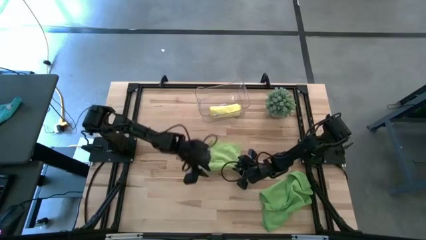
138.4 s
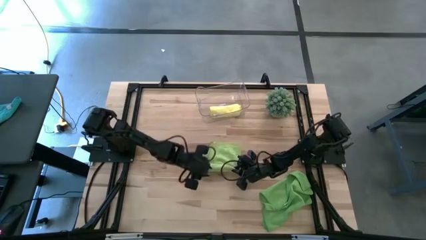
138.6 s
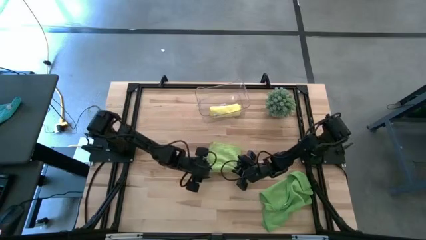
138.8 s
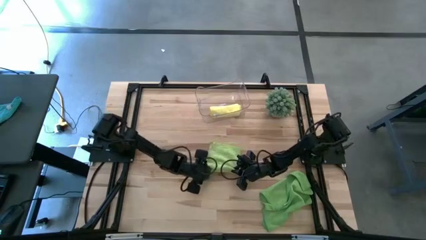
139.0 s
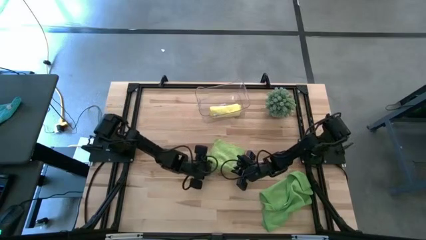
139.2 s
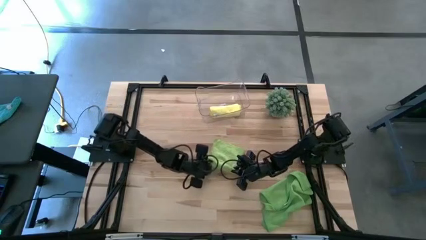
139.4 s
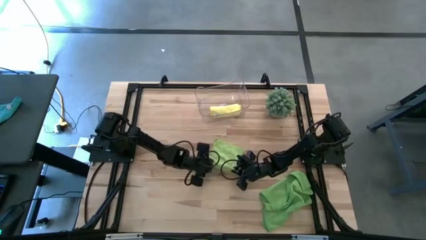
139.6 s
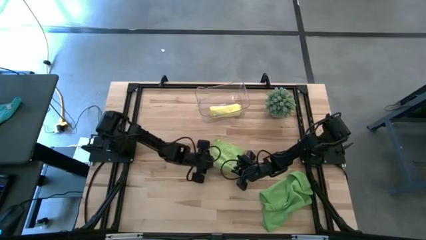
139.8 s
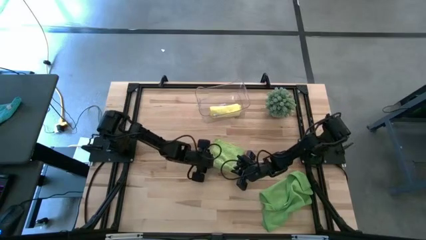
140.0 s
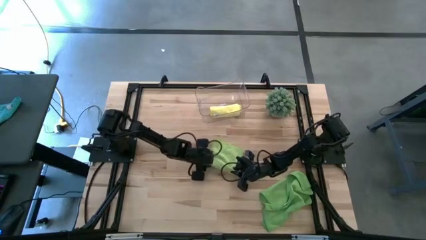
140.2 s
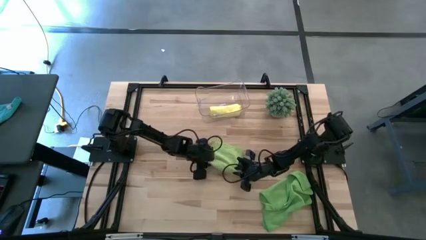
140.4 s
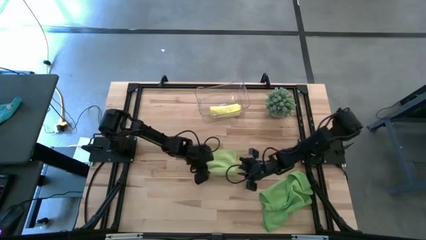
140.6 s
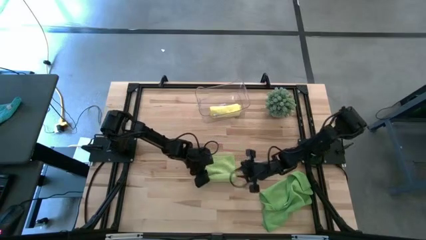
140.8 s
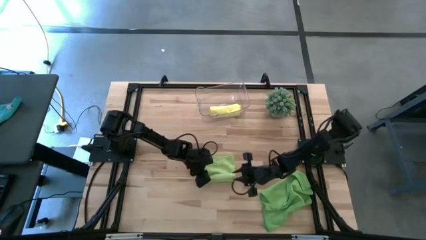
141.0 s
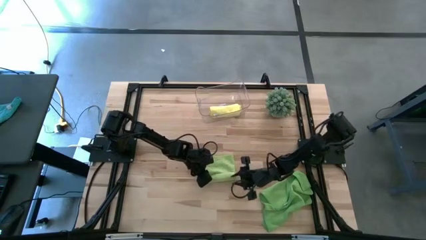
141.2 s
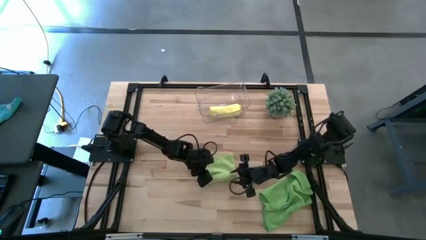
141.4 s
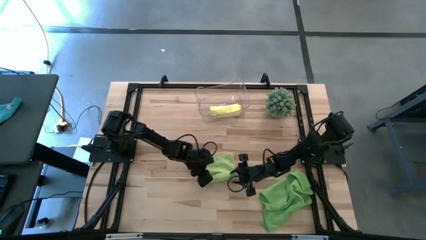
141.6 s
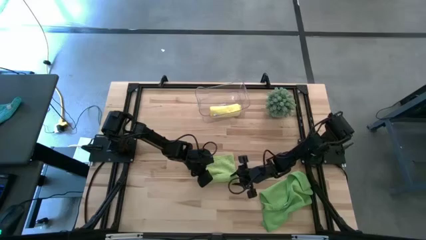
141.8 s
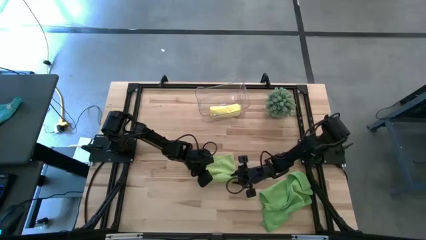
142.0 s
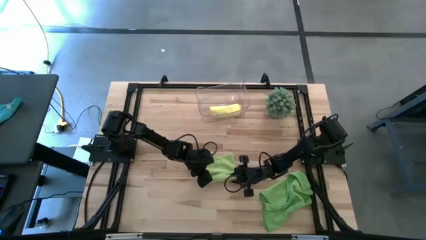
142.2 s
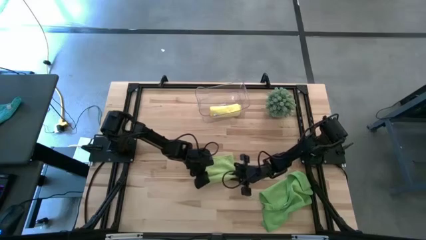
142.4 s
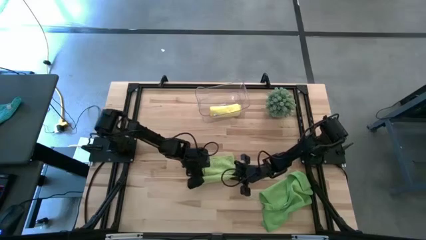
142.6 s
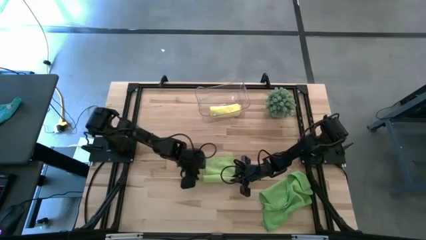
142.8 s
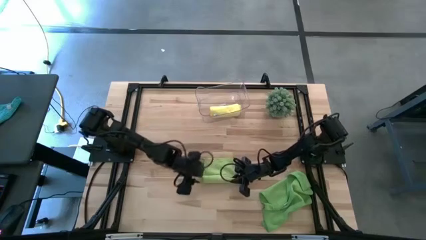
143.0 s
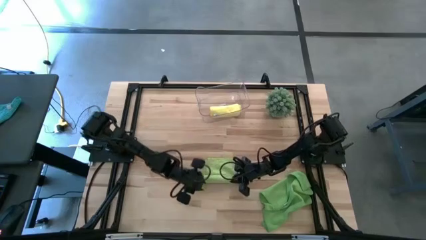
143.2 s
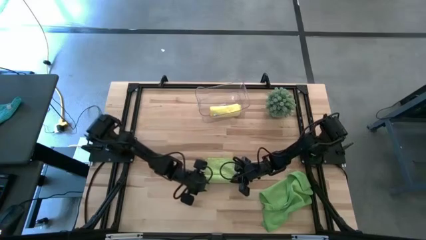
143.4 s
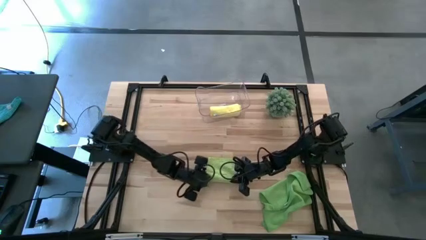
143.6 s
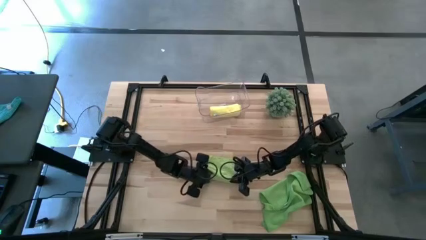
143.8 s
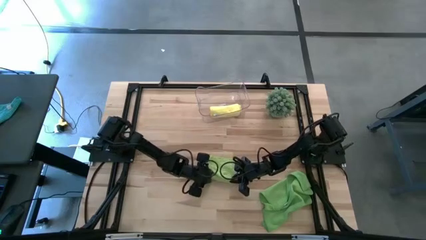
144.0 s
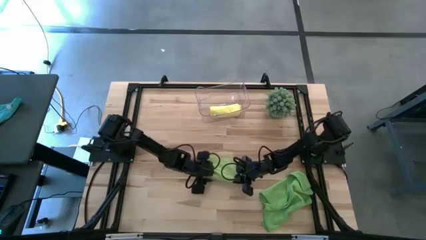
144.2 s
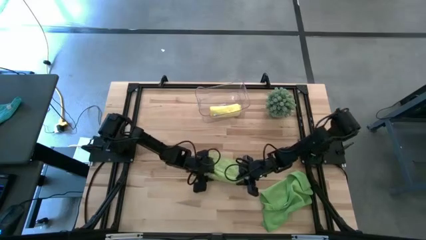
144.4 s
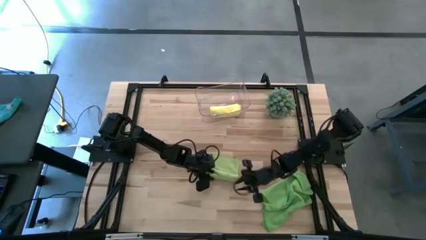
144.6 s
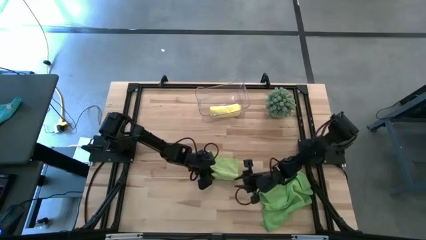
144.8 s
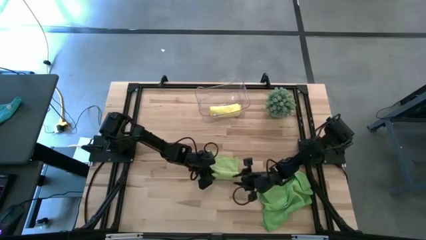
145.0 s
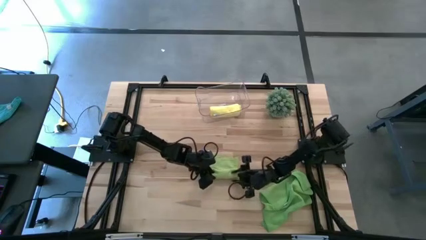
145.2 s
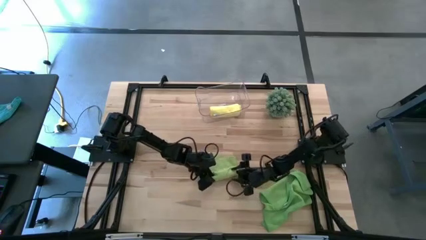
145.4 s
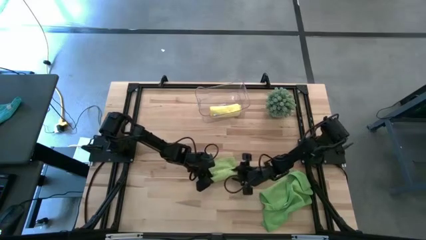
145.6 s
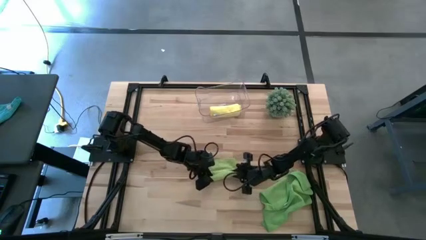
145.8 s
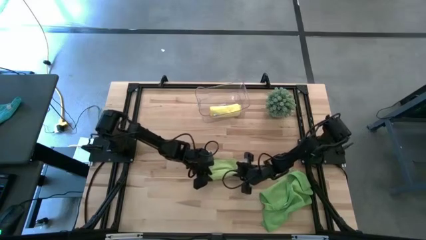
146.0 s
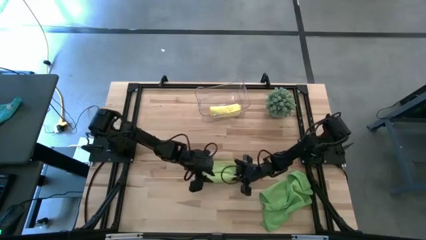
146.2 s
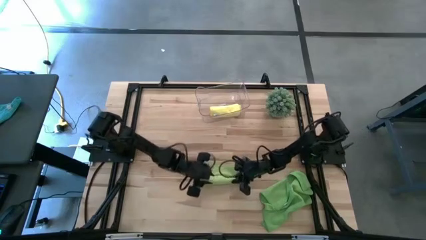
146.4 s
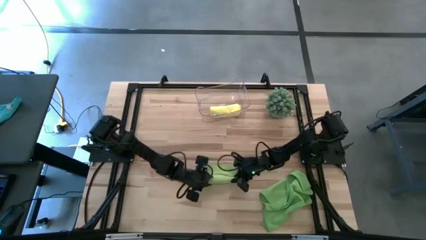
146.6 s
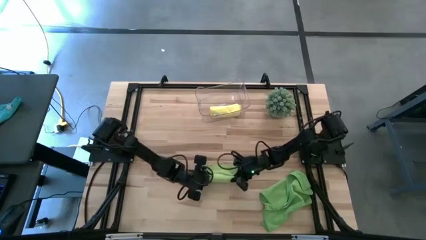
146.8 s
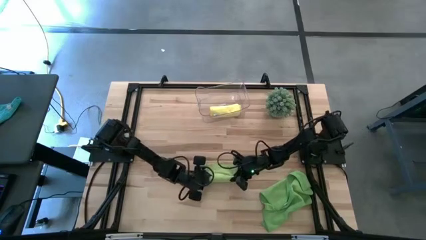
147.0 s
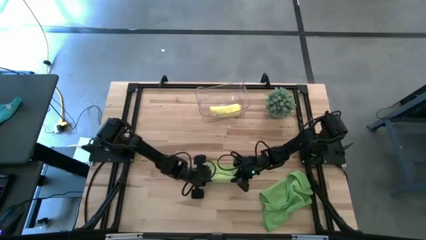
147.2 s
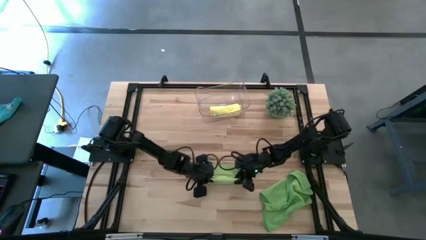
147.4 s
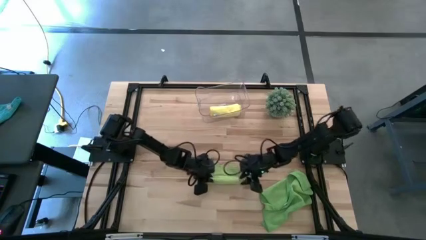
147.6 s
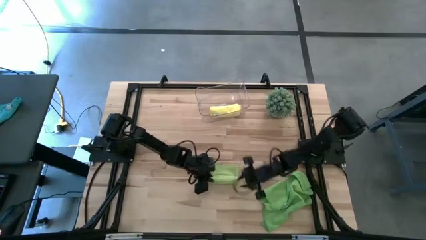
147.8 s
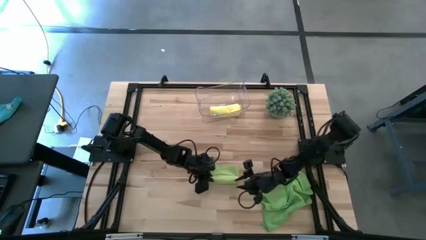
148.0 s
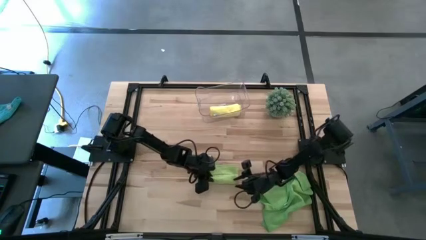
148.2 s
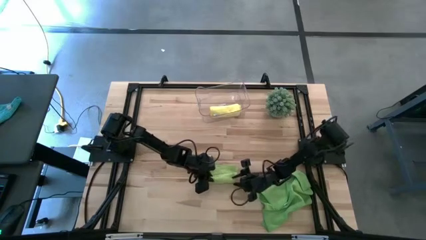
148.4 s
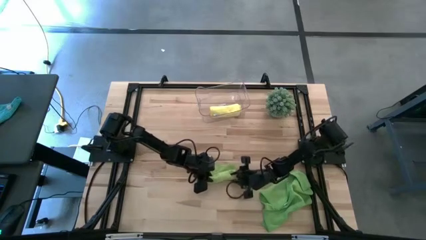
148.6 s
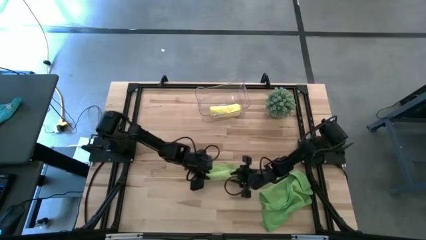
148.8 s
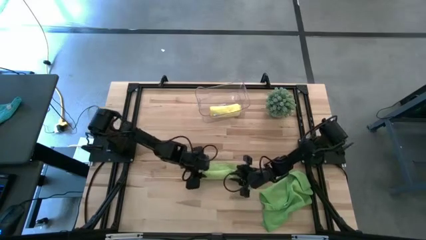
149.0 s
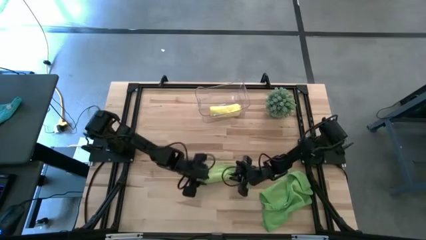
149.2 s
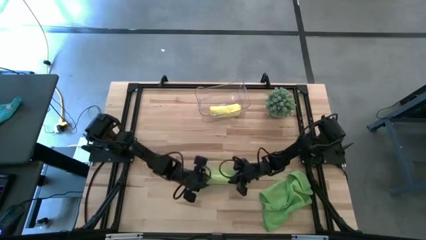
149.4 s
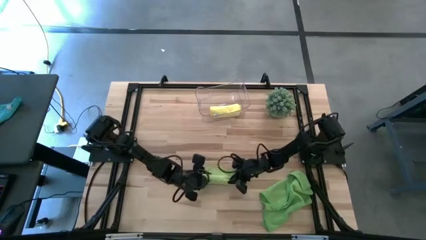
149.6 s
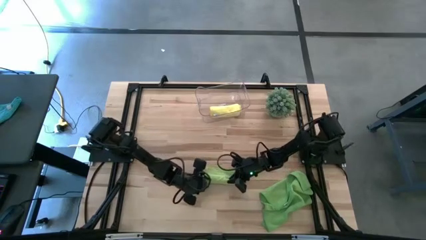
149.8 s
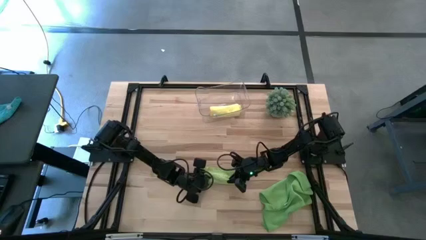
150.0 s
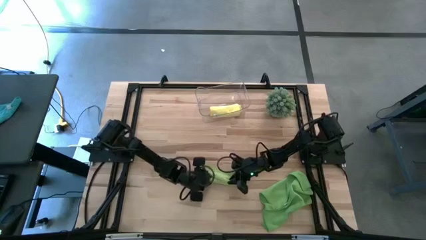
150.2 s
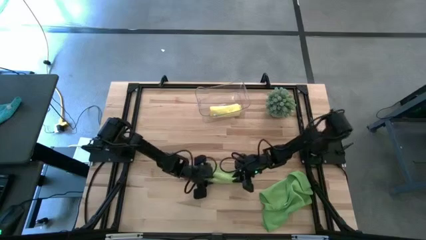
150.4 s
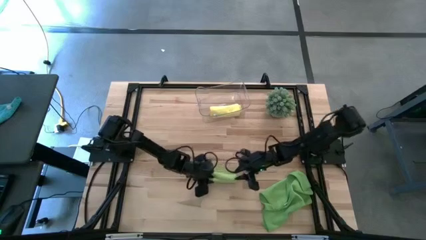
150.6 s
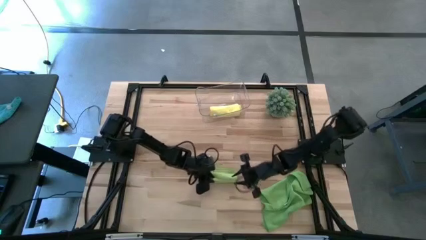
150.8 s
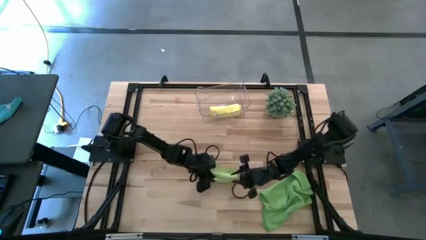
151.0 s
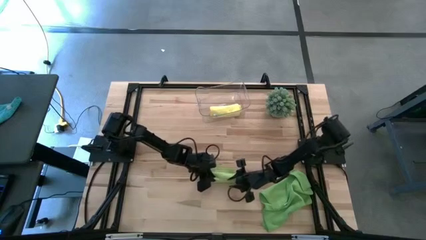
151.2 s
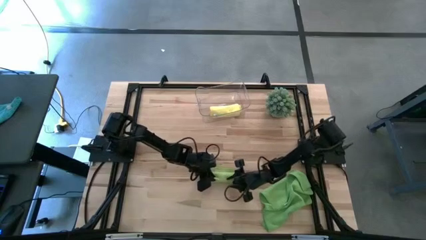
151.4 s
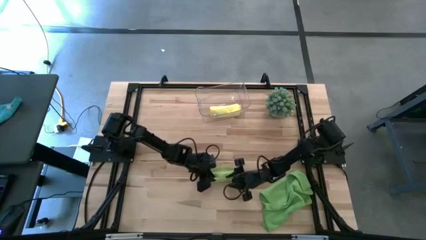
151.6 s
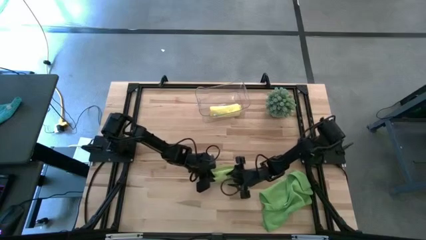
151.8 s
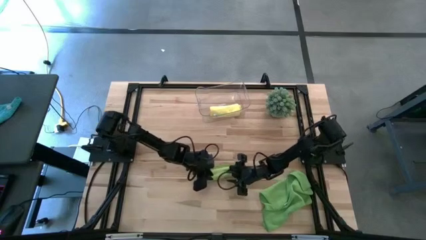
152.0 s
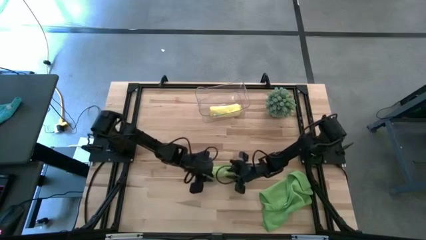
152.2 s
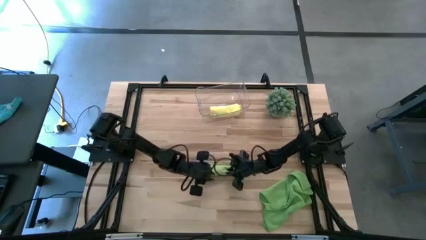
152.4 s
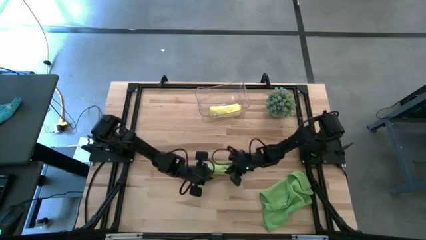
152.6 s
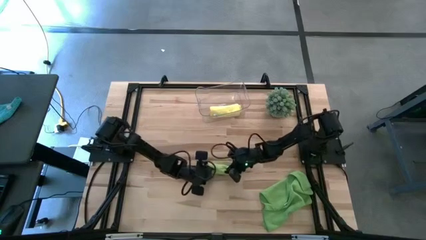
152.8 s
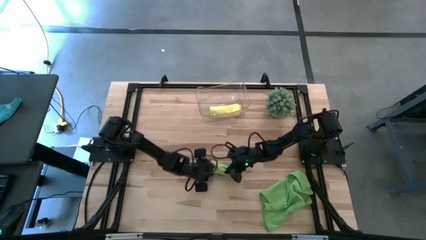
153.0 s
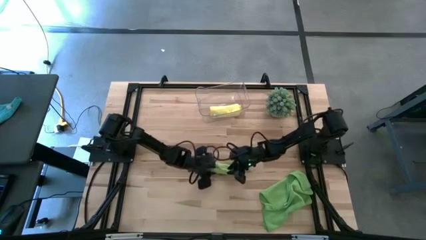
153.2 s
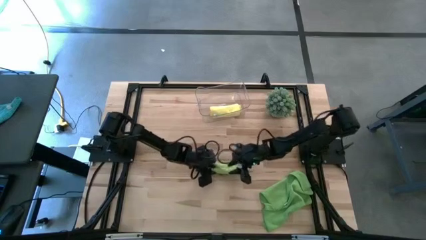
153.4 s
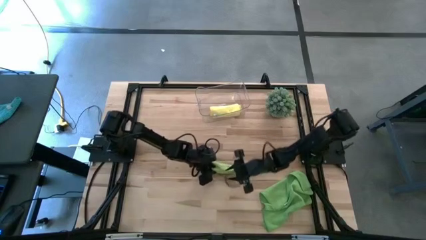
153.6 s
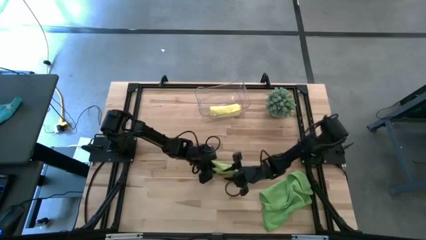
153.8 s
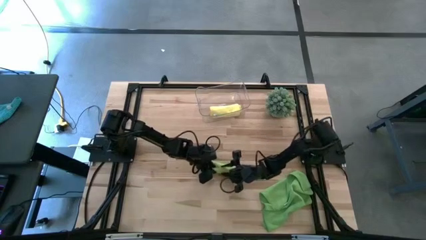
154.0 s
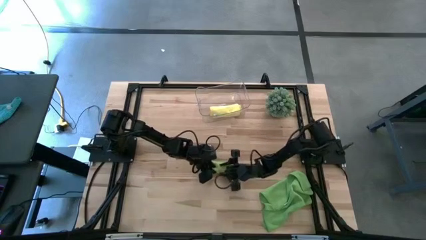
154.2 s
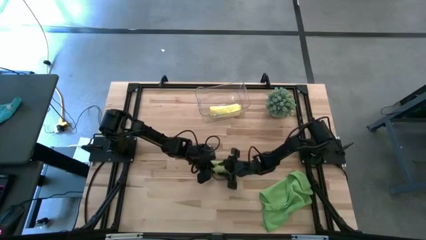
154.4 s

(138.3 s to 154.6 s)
Task: Roll microfiber towels into tight, uniform cylinder then place into a basket
Roll the light green microfiber towel

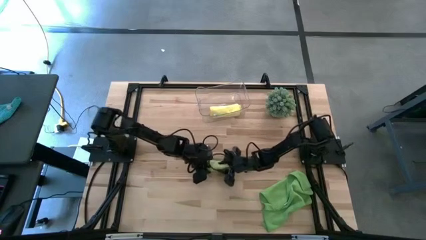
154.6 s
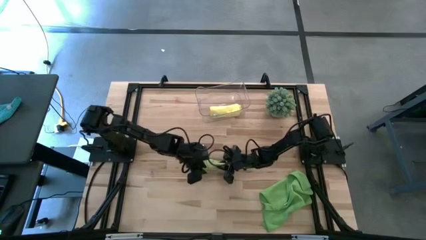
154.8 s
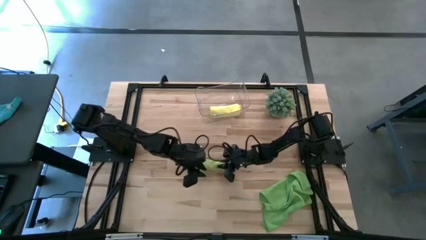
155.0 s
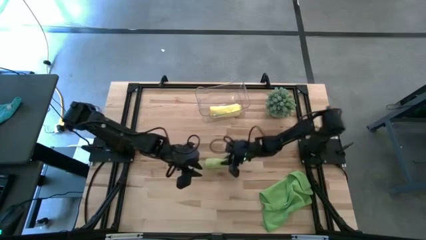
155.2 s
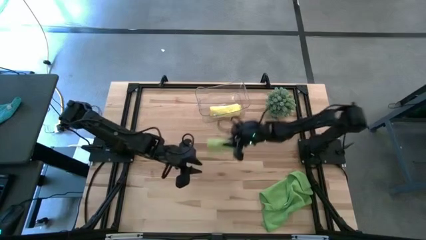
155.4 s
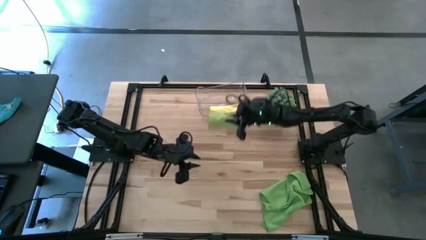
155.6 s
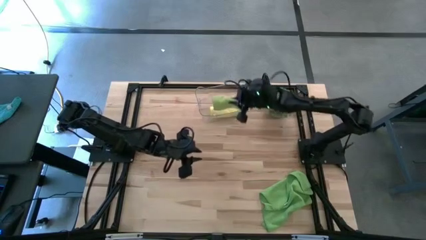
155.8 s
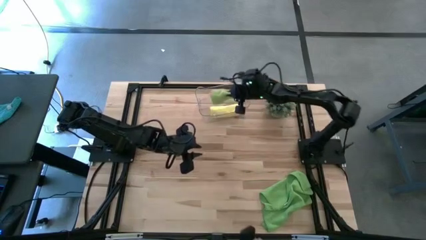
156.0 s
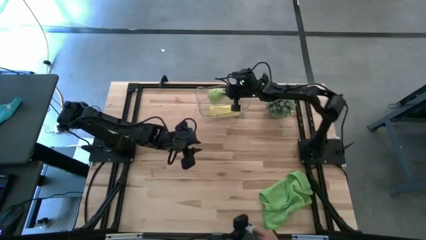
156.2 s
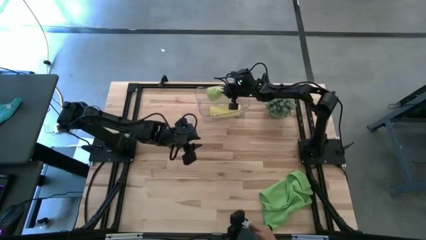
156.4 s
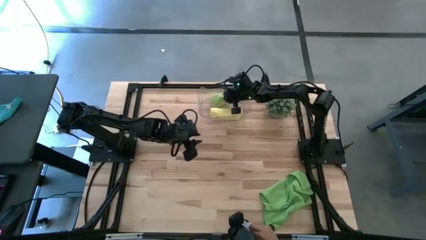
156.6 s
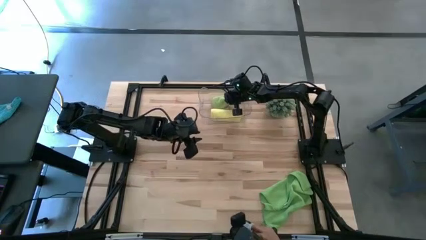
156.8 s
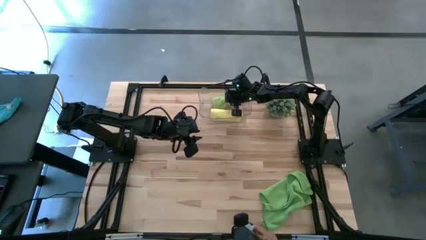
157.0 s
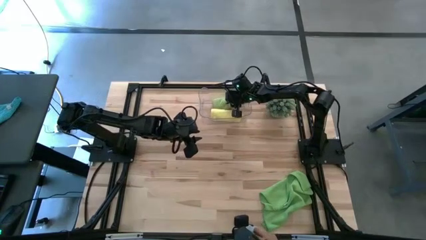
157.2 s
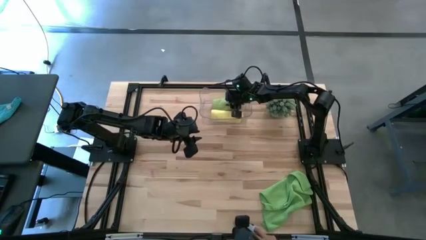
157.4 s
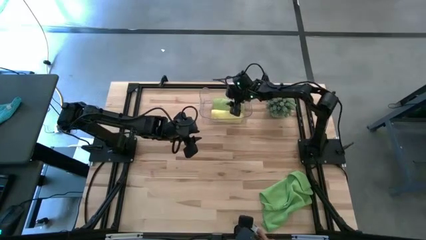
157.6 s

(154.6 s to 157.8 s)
Put the rolled light green microfiber towel into the transparent bin
